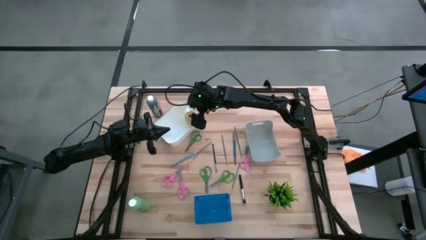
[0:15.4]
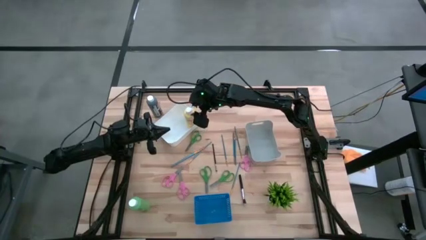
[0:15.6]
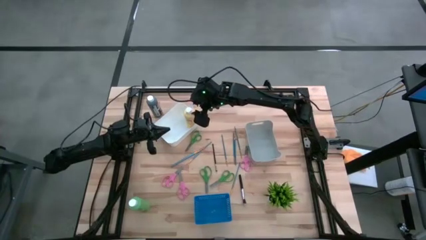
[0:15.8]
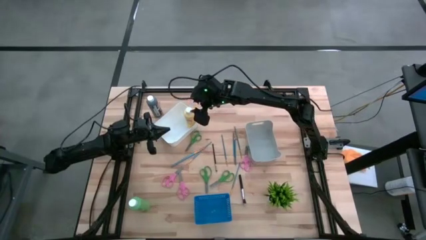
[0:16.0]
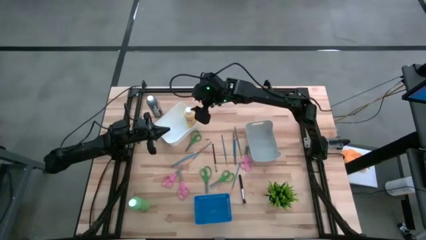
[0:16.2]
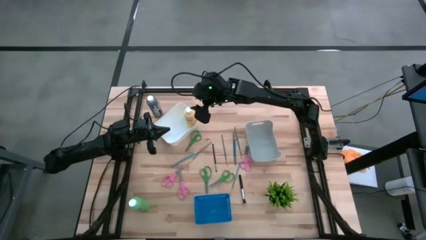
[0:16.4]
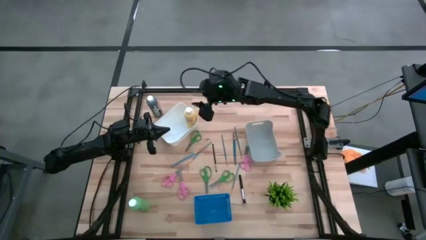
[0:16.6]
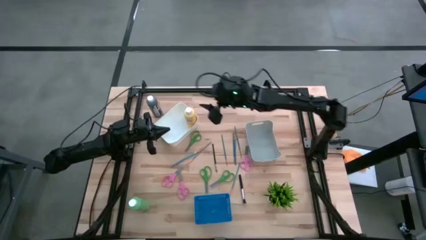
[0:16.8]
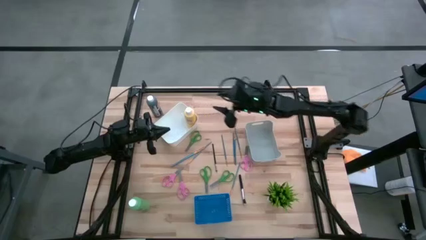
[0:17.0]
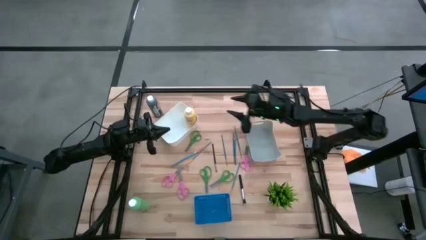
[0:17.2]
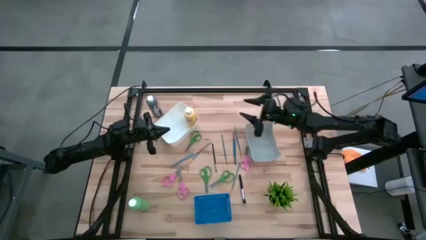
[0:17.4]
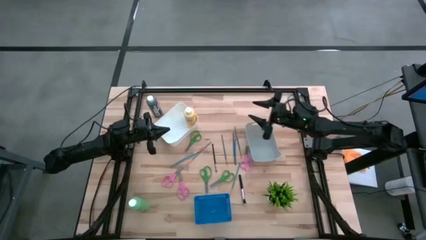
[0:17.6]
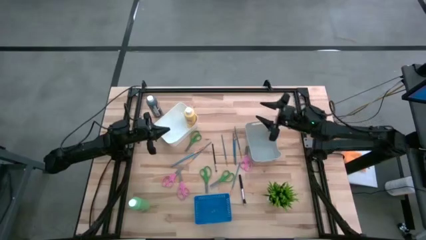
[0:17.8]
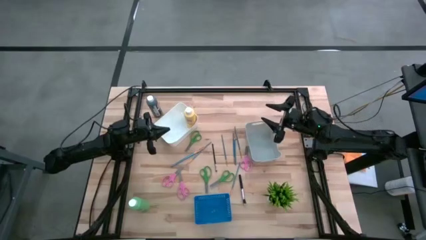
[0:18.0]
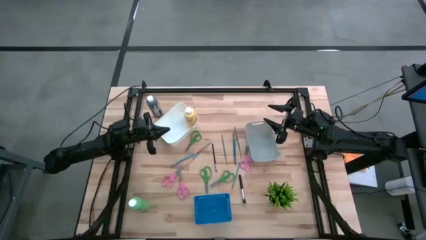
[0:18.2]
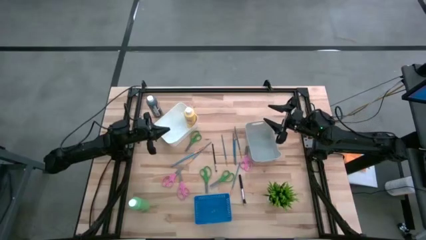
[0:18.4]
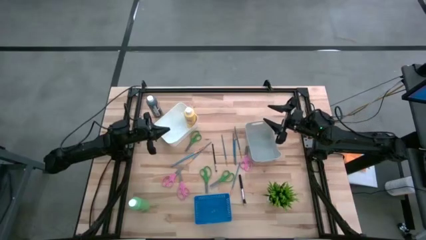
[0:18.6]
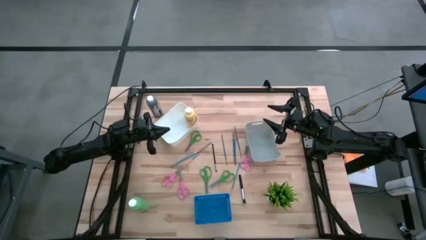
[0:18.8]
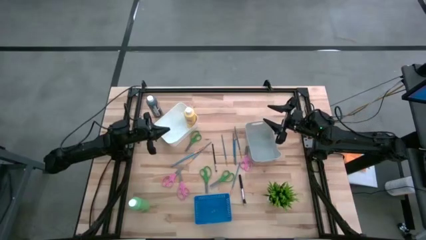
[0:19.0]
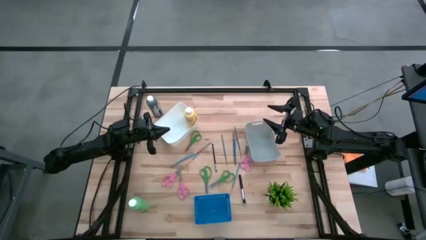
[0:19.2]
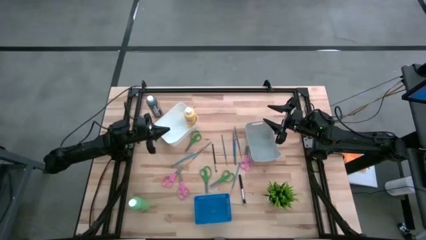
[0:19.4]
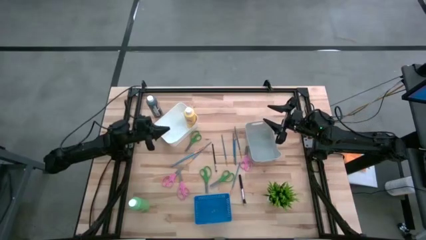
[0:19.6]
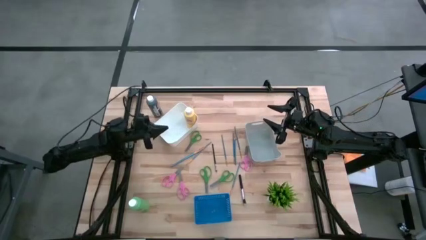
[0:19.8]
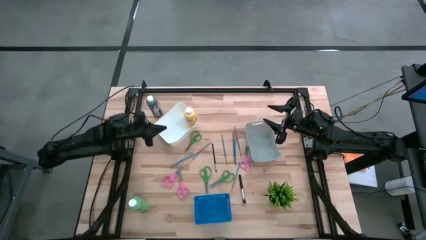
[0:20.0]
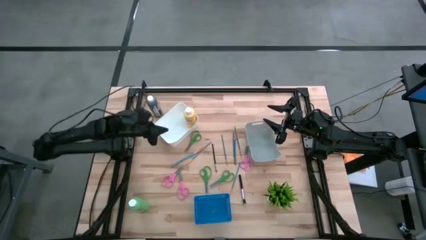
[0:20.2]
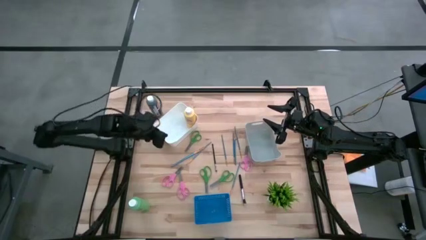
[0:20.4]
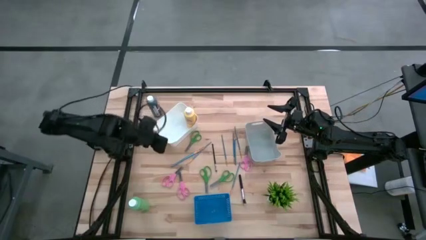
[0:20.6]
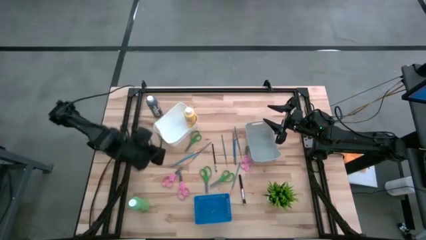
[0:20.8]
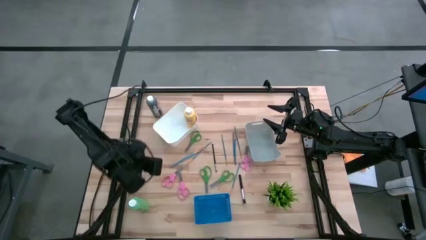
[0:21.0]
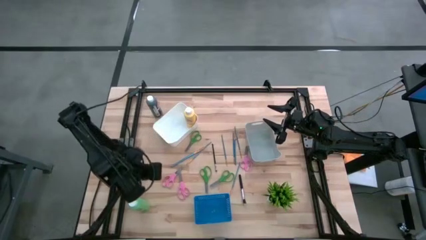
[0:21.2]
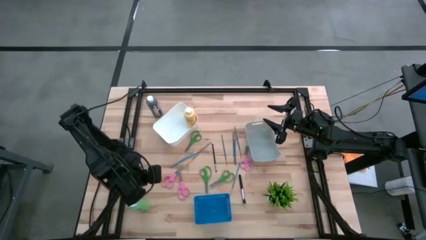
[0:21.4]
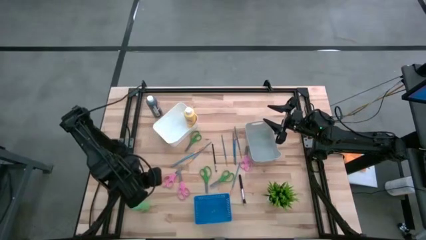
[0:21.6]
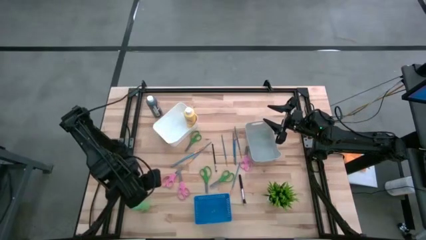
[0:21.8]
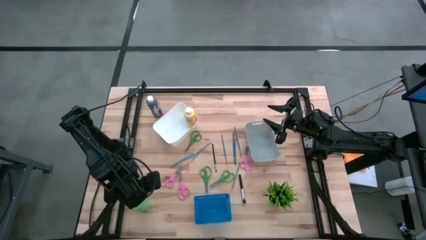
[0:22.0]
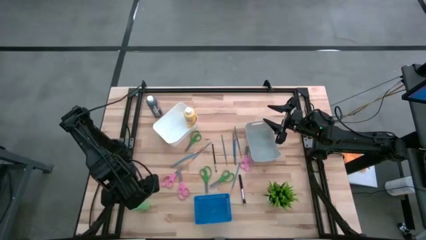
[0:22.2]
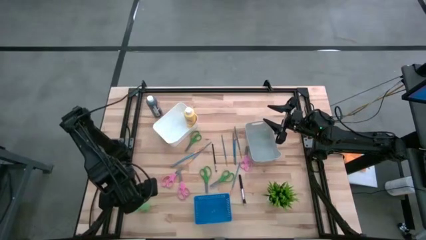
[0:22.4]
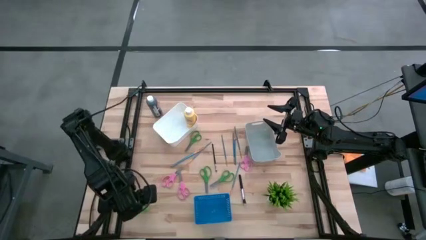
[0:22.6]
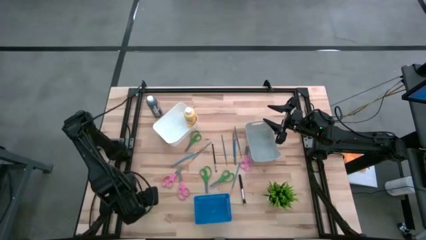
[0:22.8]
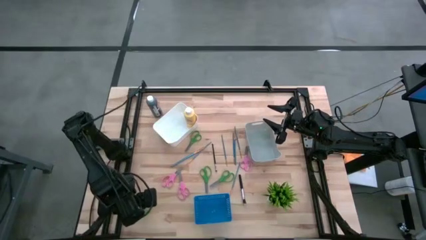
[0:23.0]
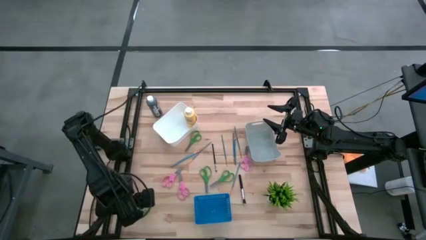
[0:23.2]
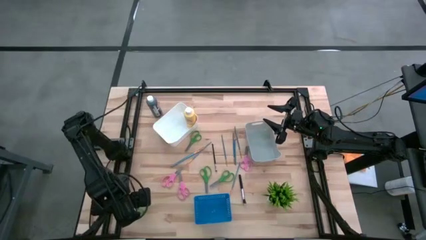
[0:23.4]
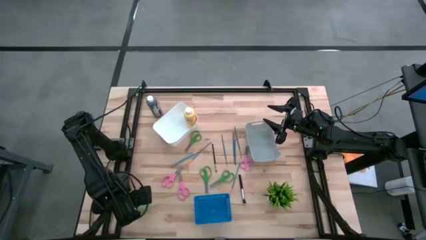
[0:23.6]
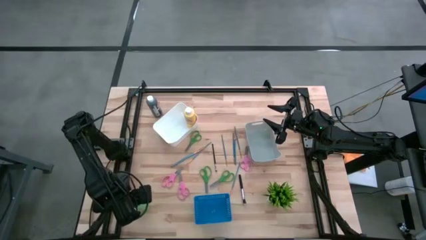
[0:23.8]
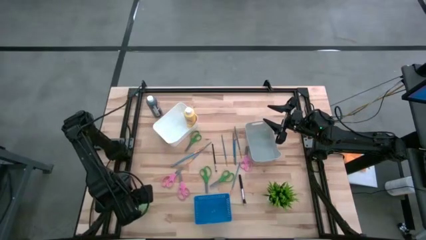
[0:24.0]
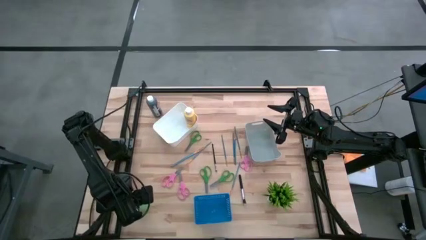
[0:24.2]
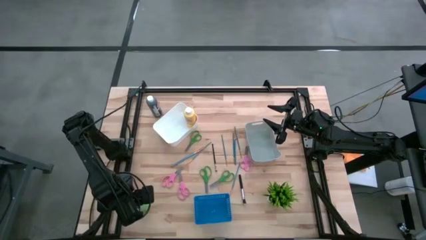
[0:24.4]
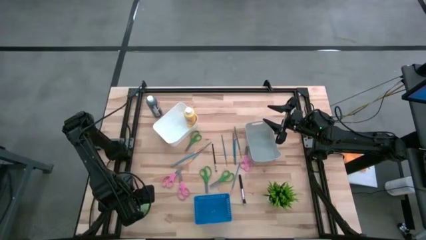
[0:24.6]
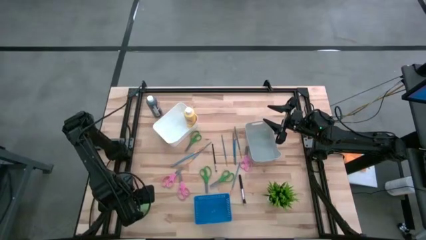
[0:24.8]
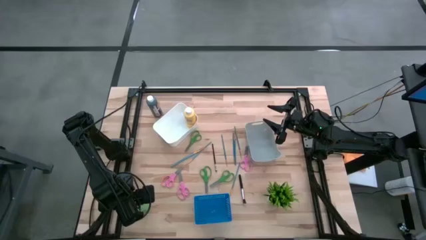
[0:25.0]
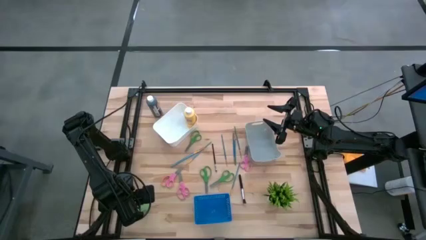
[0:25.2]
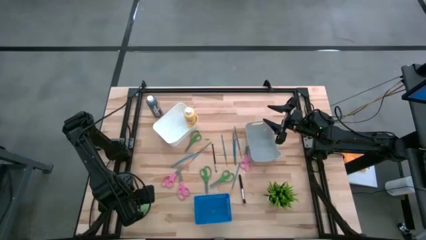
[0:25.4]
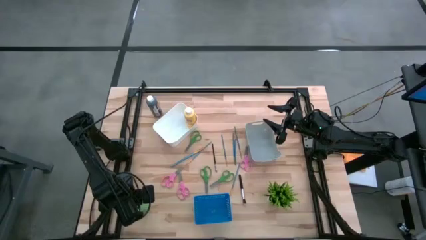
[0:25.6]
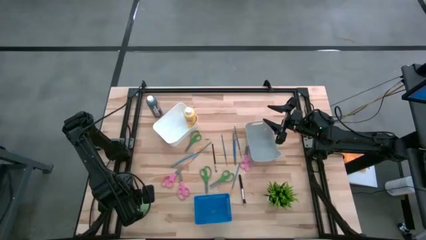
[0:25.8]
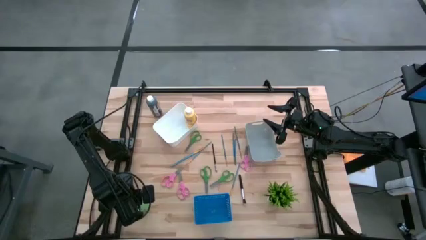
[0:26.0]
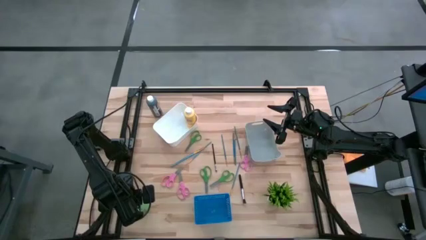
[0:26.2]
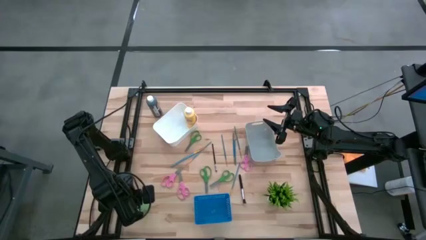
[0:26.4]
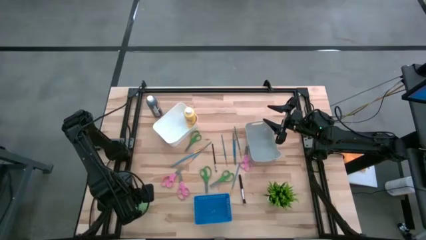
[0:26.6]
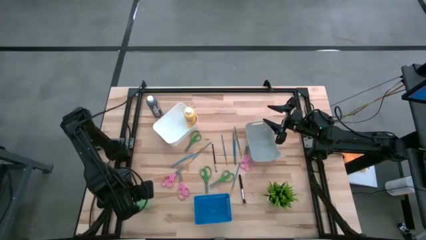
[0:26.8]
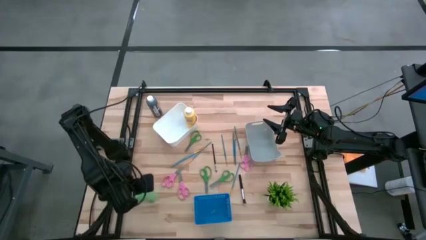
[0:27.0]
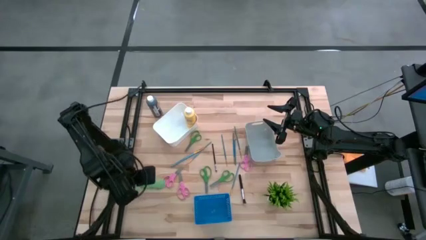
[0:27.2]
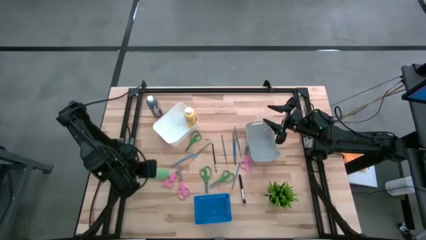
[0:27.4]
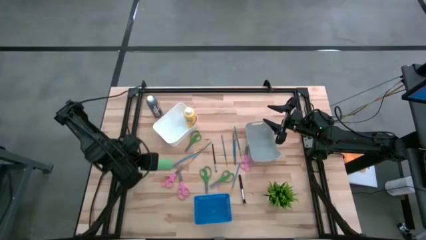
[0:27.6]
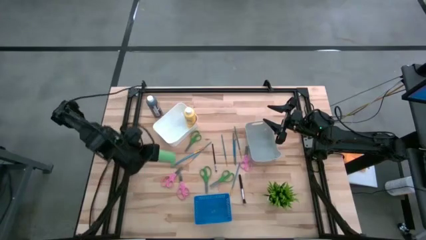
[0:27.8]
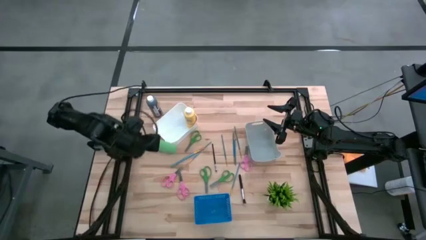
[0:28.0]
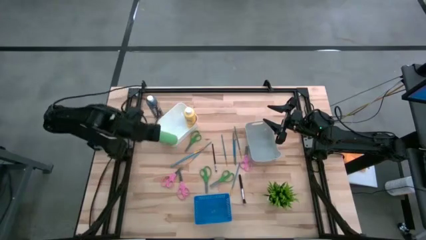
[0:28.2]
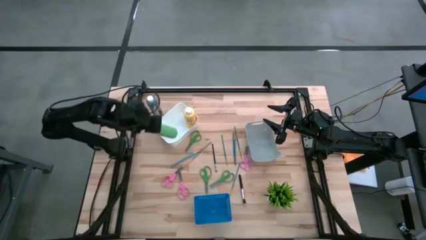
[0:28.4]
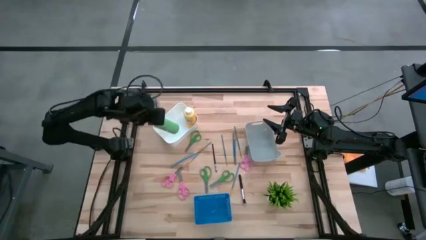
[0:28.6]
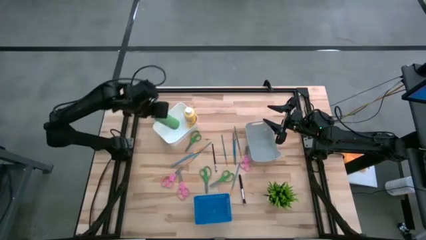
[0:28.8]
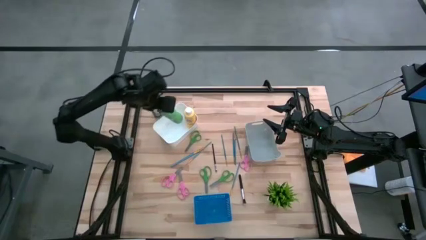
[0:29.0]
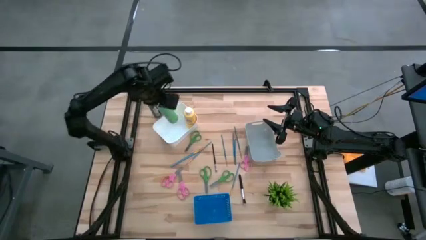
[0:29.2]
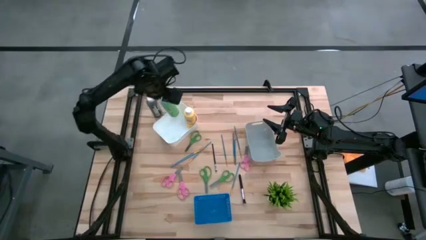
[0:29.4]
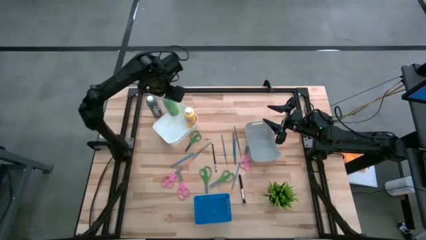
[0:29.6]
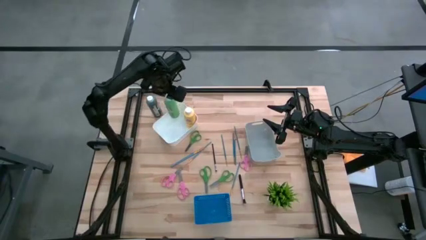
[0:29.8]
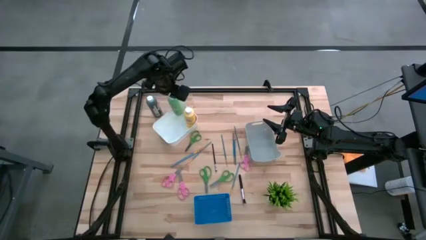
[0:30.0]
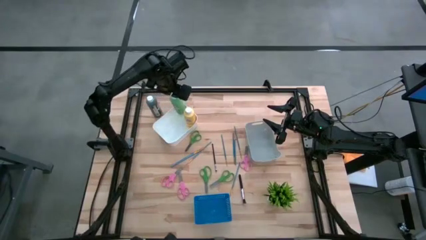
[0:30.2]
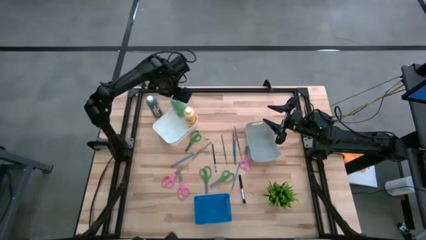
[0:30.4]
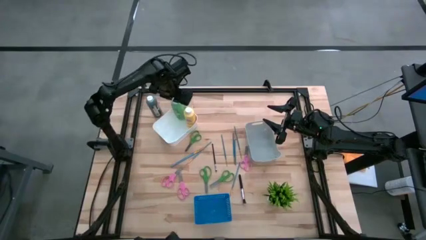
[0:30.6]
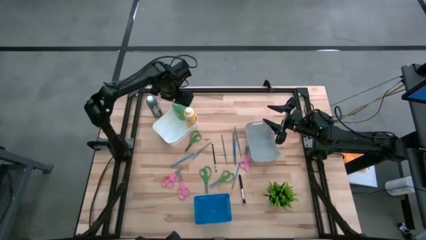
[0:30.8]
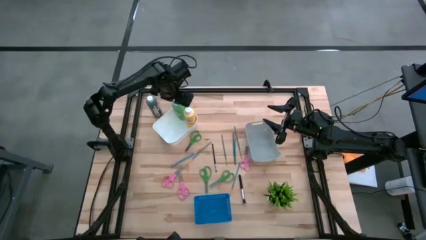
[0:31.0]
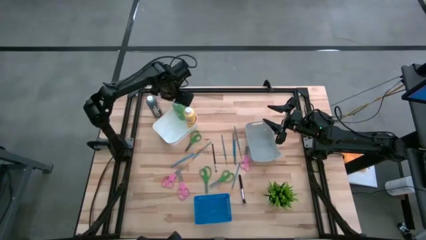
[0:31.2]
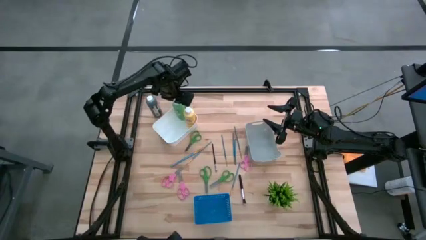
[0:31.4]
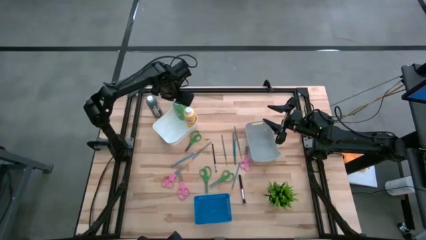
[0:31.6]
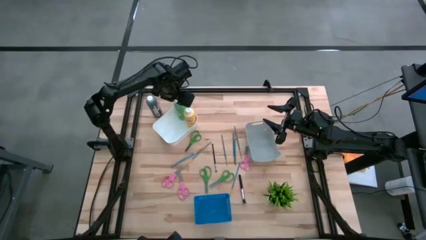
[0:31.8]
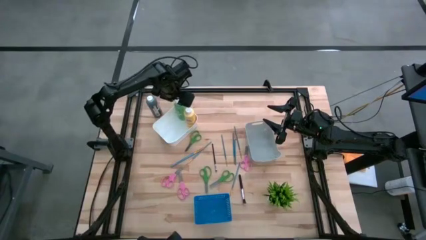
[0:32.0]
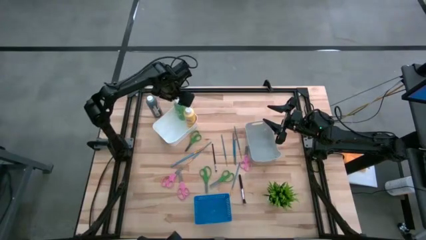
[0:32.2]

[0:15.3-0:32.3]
Task: Pick & Place Paint Supplies
Put the green paint bottle into the white bin
